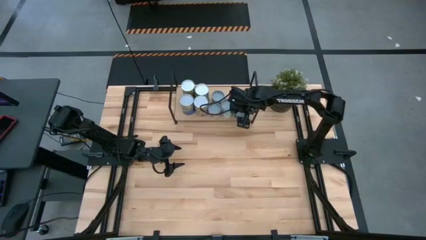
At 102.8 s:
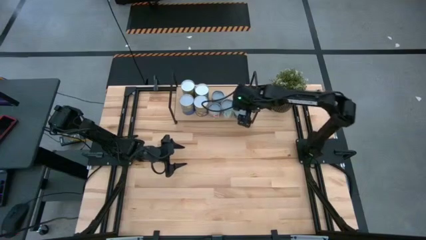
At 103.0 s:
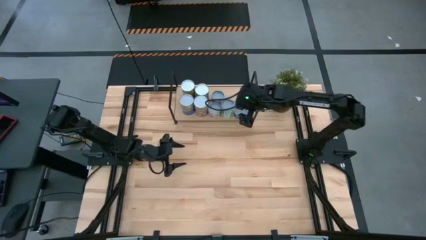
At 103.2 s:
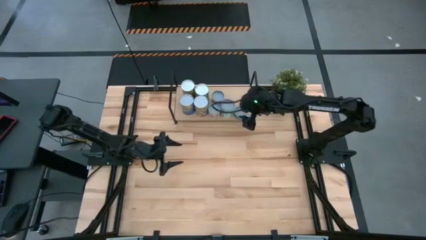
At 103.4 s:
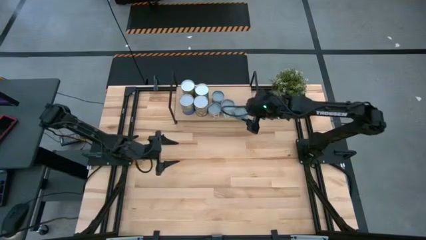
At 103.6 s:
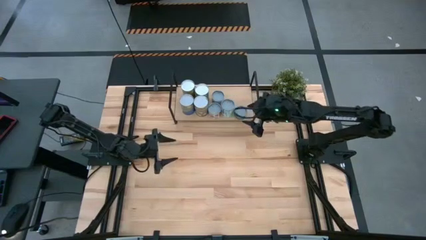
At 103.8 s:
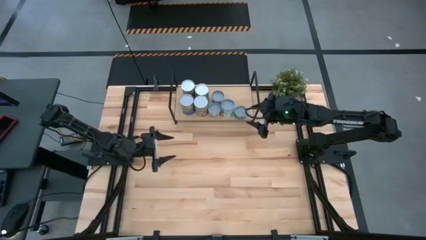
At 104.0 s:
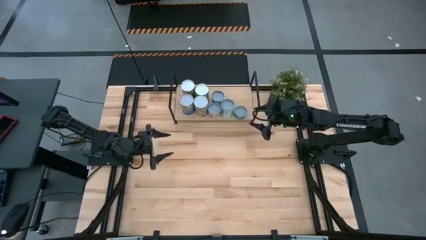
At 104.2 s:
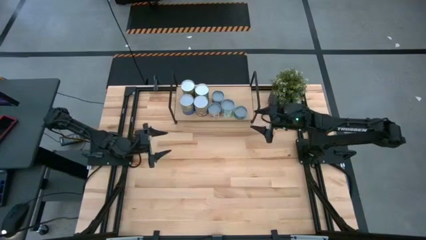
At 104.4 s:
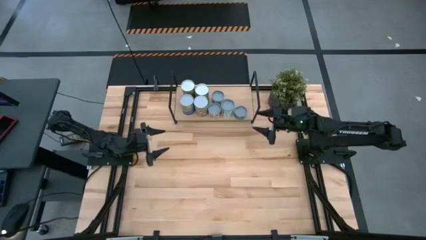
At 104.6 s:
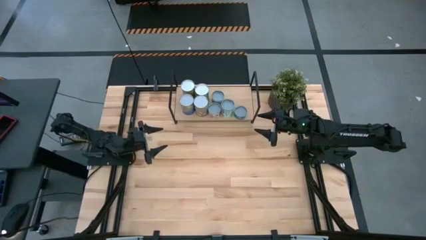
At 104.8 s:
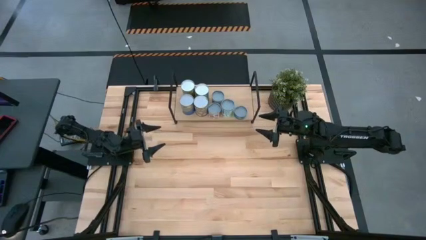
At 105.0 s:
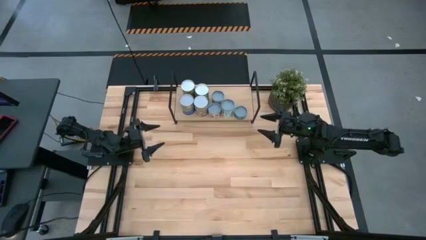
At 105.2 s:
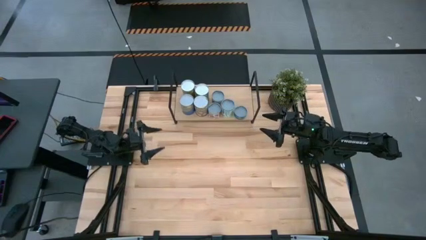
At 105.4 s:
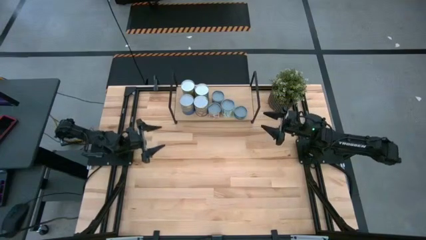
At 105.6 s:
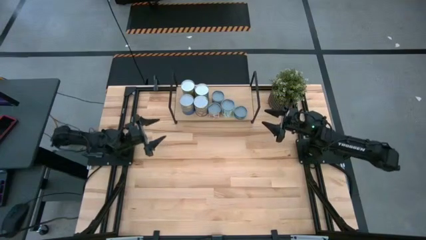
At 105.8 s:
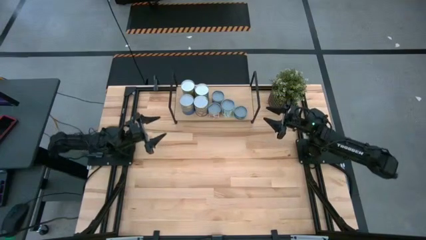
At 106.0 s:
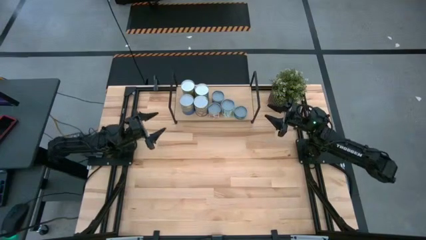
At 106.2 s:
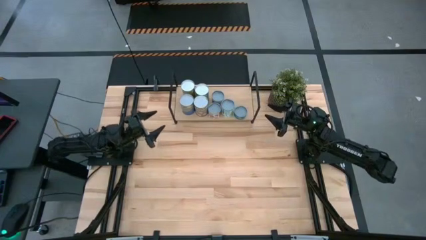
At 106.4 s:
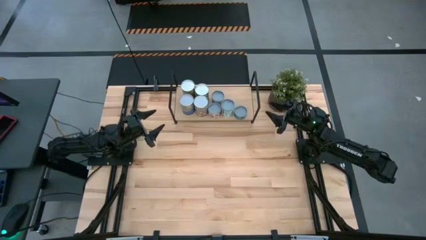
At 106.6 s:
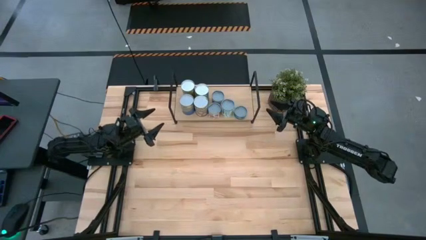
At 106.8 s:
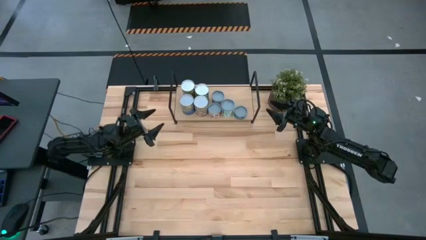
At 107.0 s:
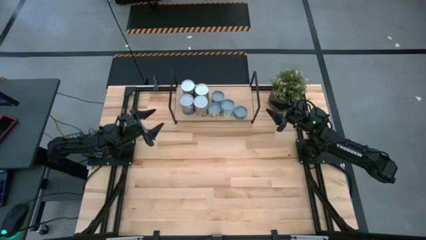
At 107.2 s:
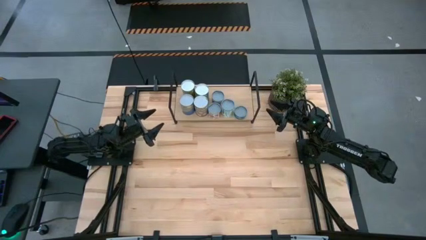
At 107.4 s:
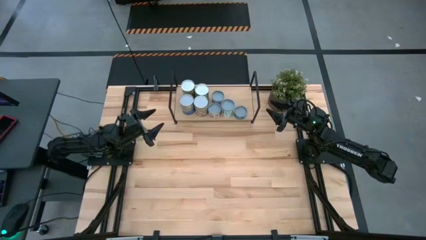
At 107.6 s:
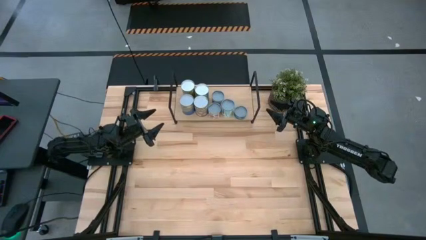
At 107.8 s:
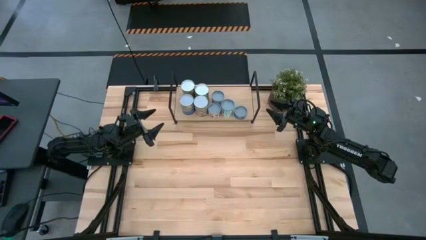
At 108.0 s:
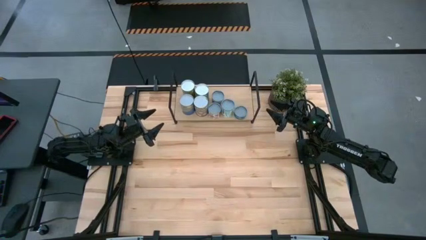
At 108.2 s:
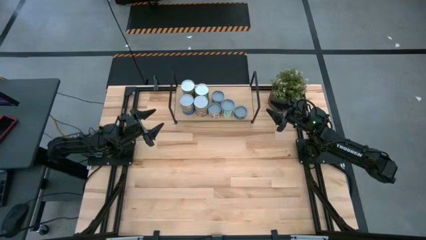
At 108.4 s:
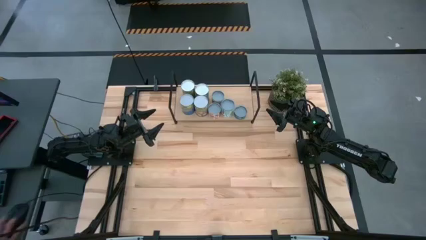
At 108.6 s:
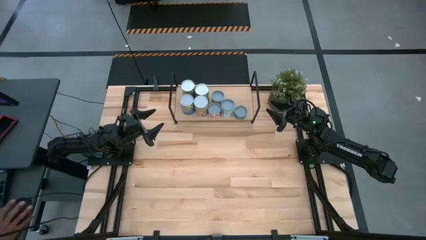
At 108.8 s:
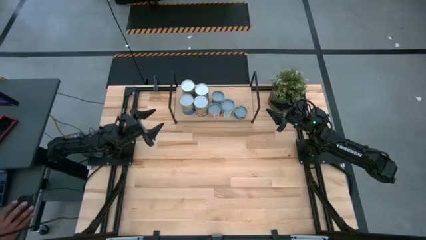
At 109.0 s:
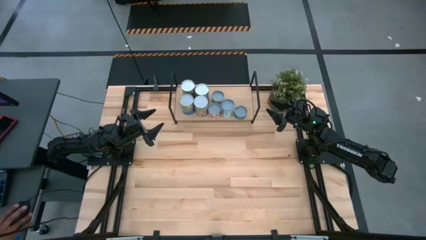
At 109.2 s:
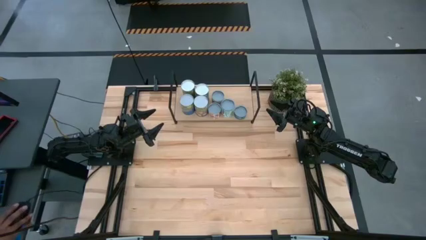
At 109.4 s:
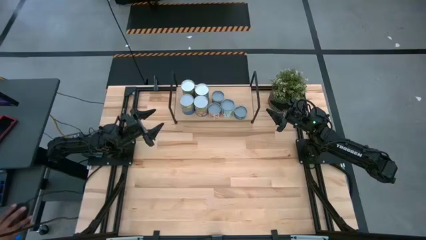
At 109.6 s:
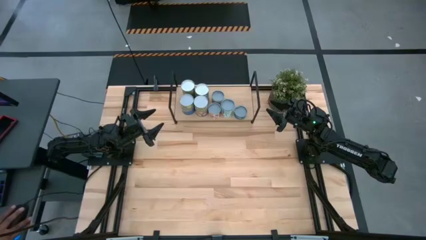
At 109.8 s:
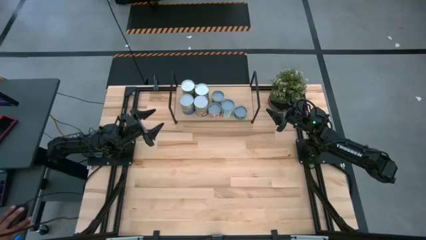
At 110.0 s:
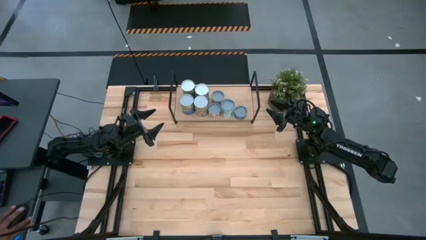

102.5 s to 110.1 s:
Task: Pick and place cans onto a shelf
Return to Home Position

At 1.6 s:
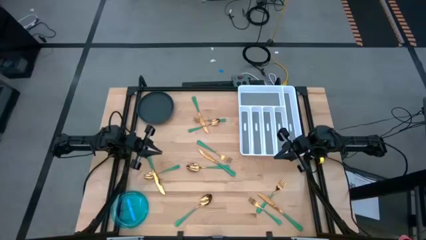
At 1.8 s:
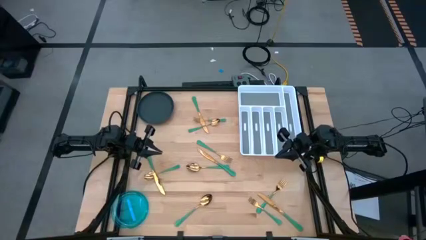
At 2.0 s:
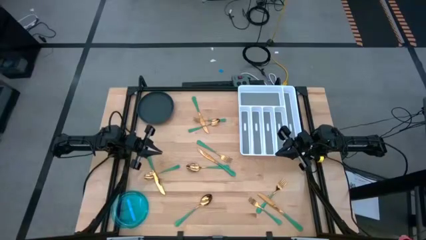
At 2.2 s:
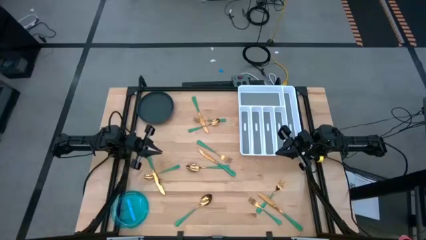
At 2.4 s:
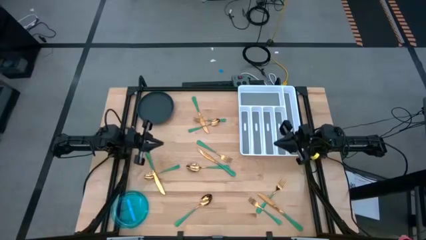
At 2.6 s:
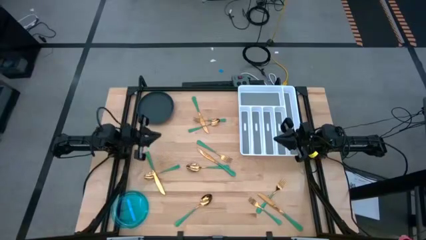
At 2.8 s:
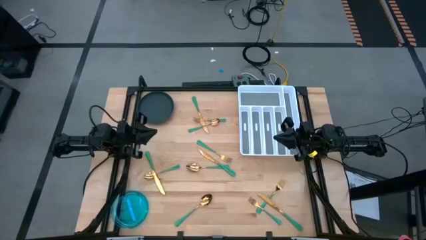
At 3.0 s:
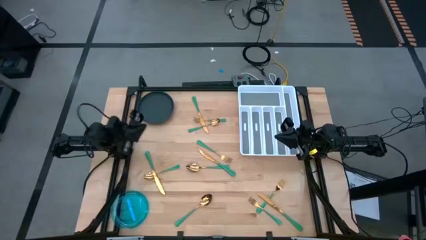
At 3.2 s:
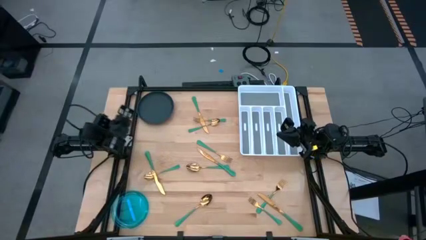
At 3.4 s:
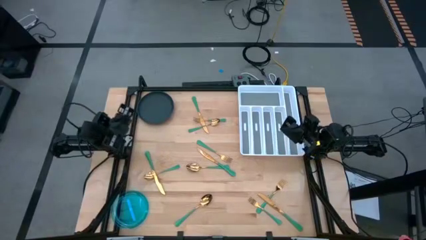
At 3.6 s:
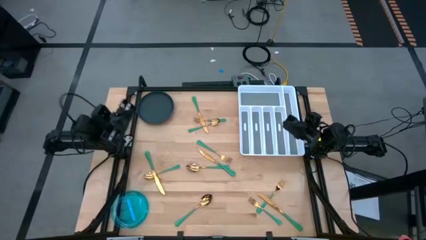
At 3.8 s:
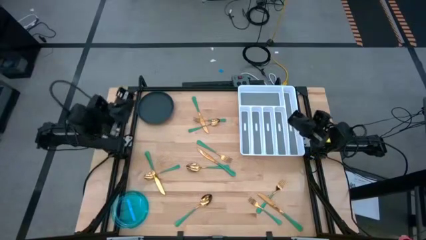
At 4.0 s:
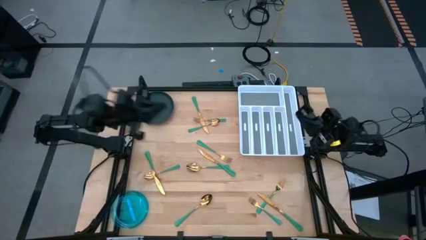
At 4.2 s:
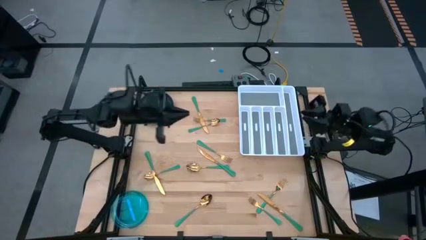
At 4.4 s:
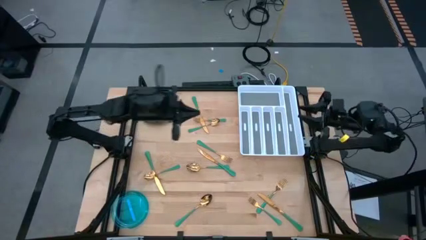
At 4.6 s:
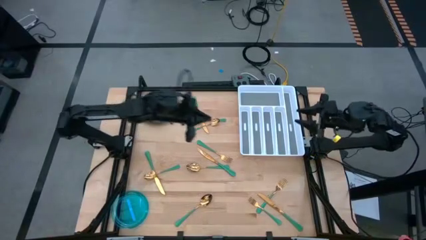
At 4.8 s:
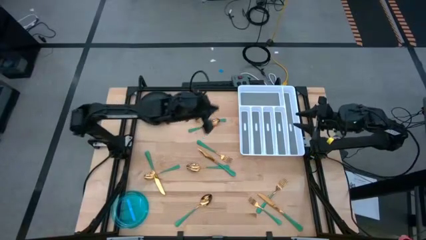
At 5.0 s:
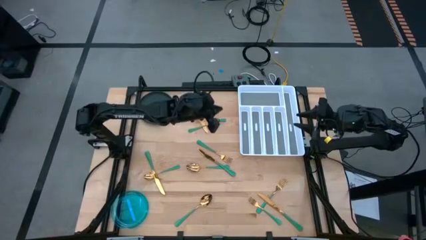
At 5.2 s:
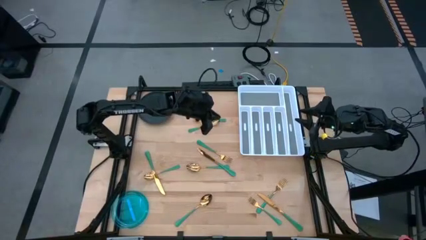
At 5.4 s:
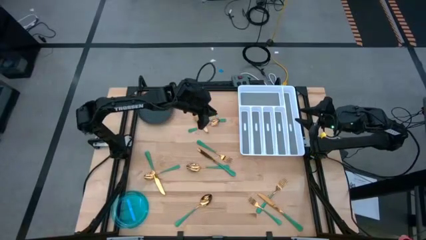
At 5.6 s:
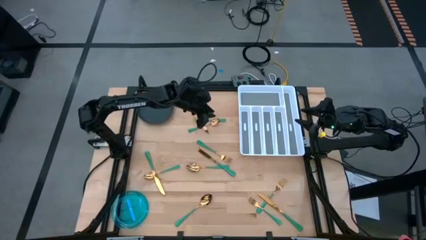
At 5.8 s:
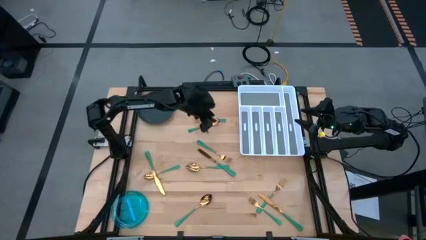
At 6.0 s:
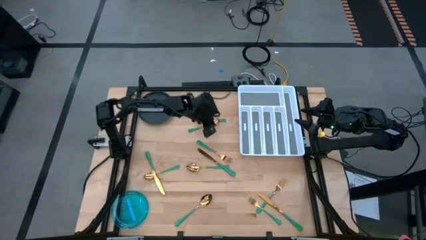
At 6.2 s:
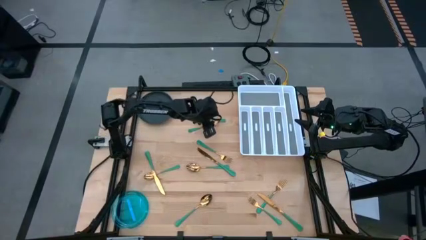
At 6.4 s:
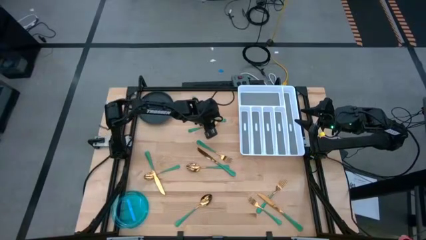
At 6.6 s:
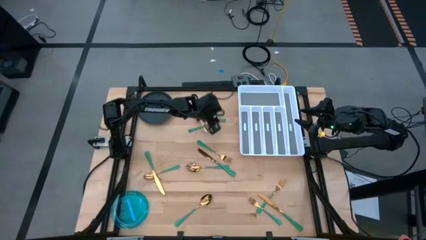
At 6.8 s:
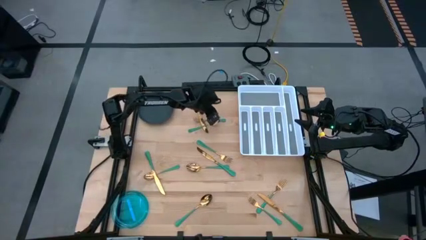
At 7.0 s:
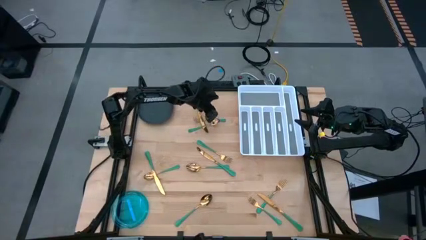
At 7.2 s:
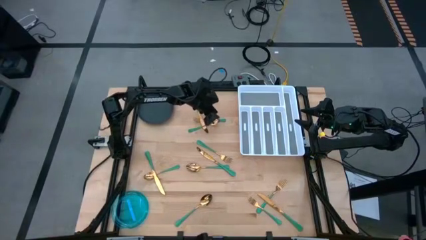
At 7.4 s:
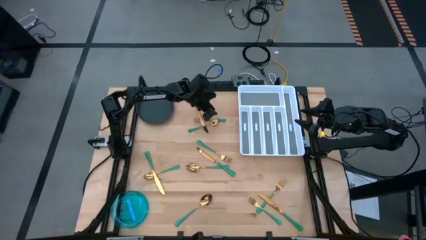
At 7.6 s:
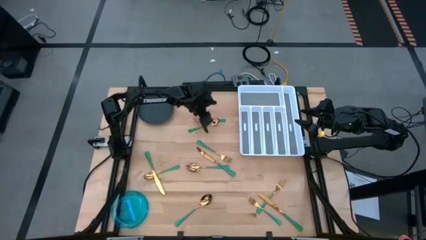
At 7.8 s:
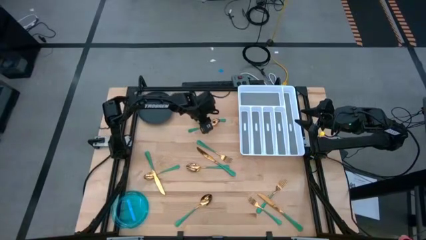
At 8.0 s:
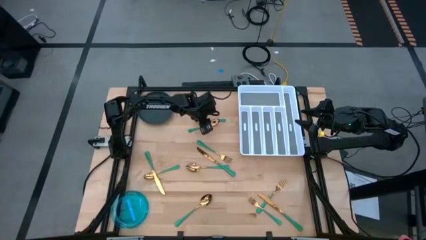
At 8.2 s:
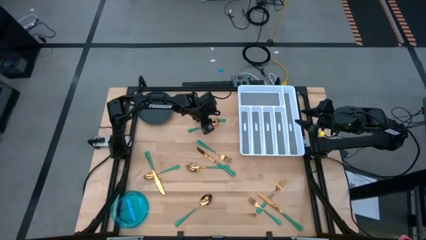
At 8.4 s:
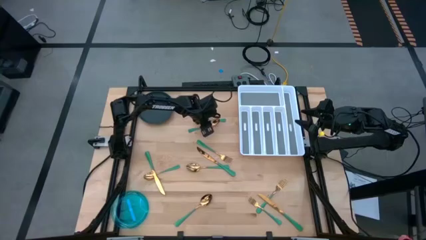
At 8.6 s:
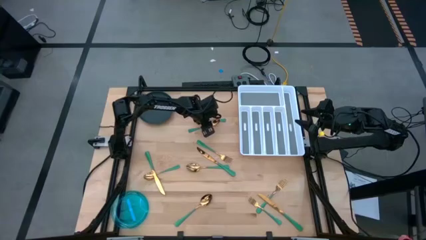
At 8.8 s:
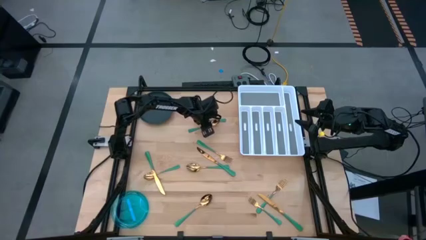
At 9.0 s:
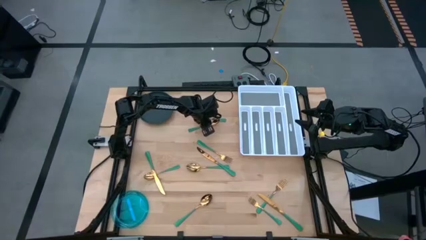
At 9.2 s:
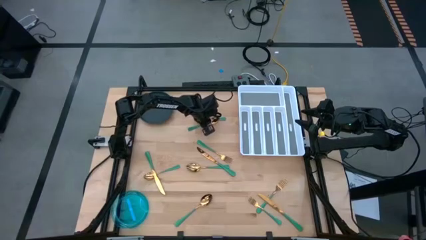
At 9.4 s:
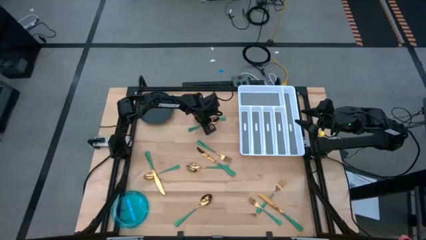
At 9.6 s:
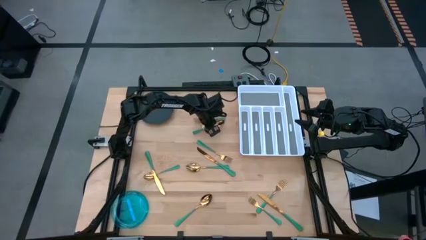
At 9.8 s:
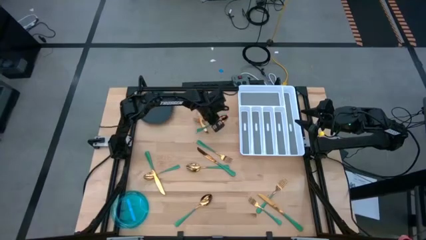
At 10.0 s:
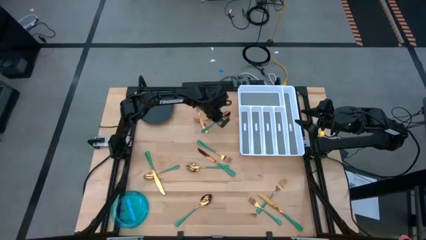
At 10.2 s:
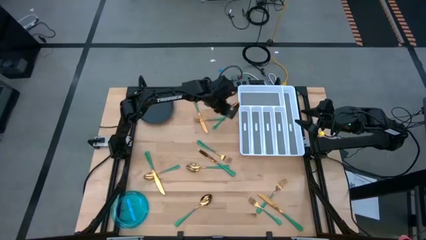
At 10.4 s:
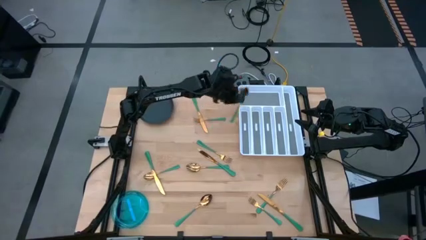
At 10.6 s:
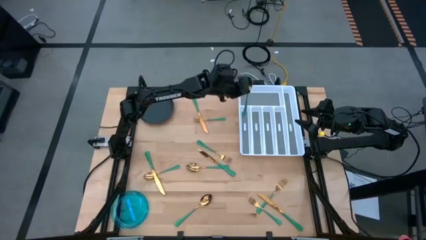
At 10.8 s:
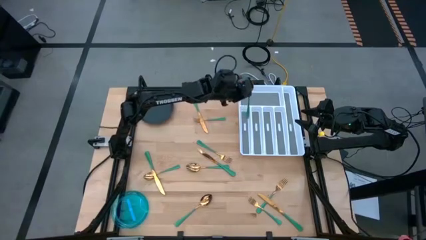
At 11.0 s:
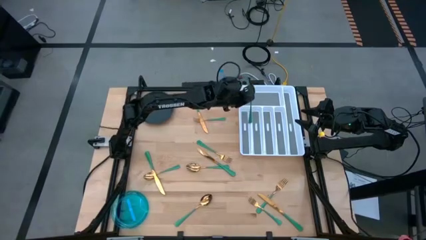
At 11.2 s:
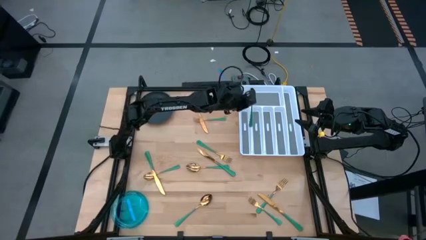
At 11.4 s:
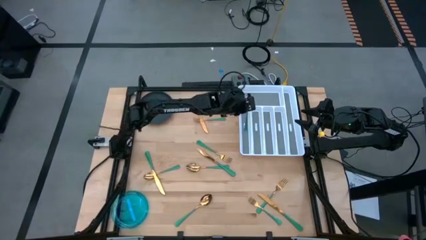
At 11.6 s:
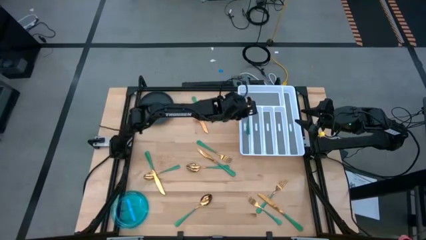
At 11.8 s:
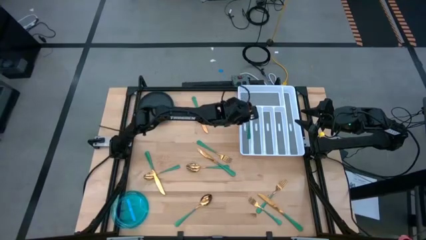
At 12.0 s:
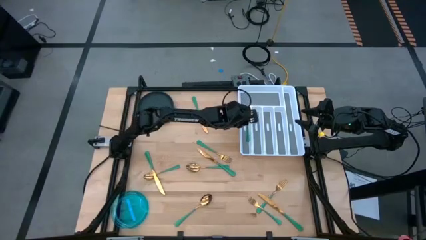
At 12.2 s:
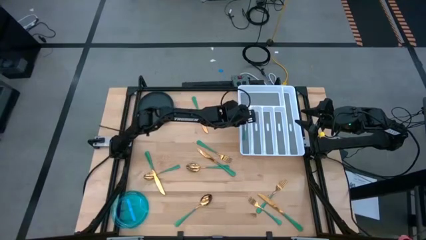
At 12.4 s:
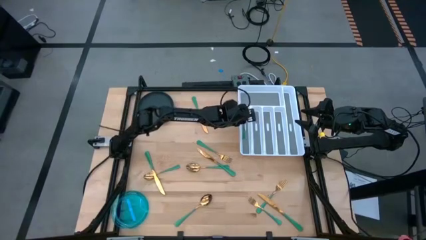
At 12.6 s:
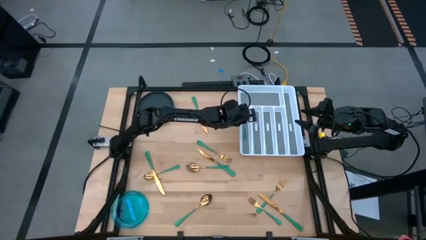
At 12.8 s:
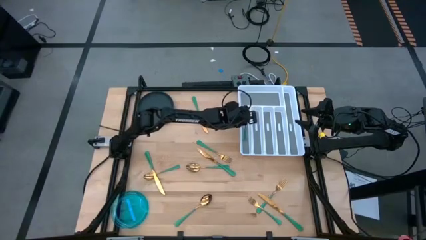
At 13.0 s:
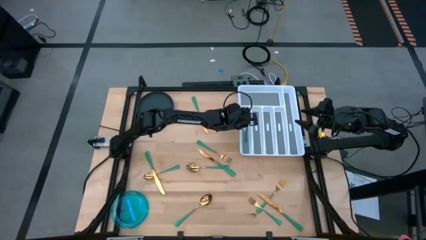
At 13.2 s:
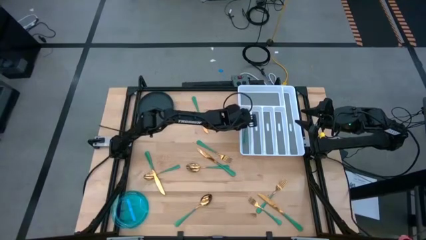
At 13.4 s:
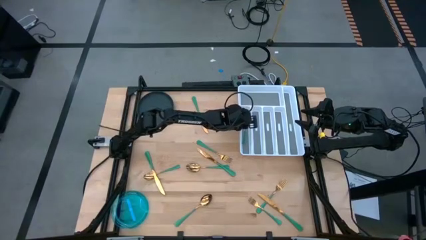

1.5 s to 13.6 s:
Task: Sort silverware
Put the green spoon into the silverware tray
